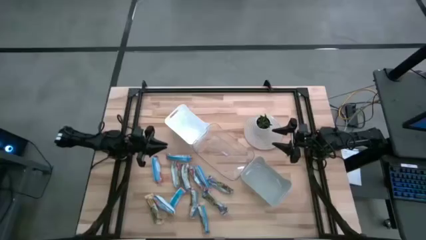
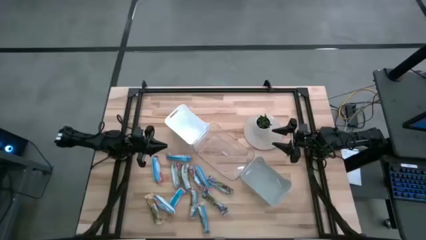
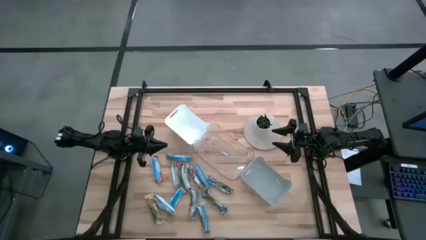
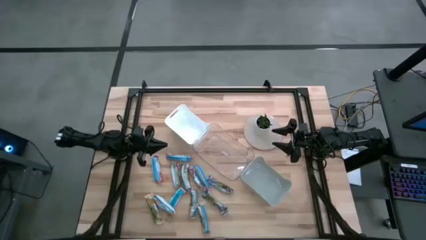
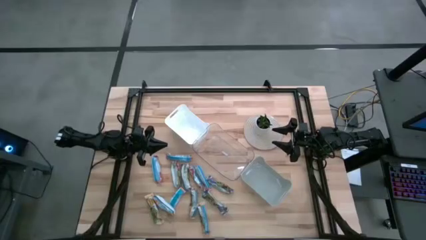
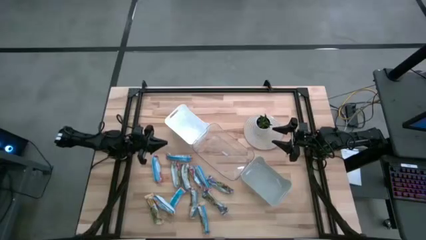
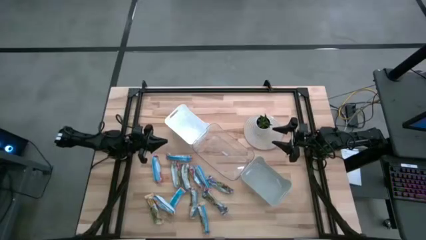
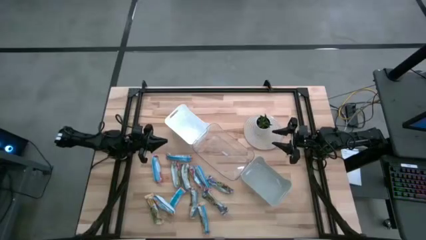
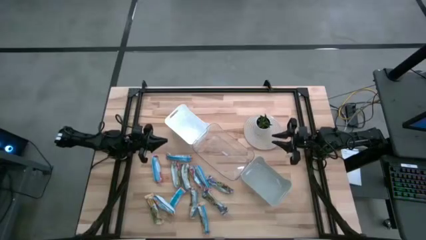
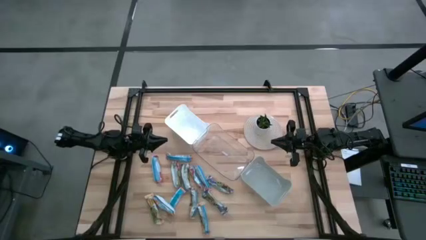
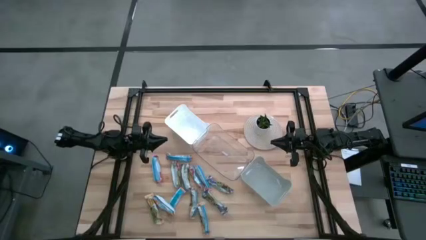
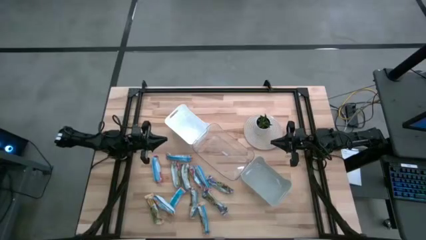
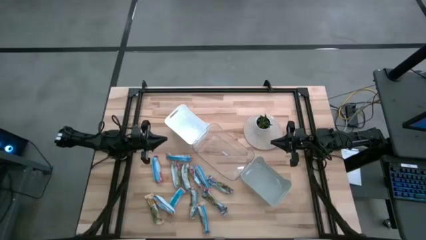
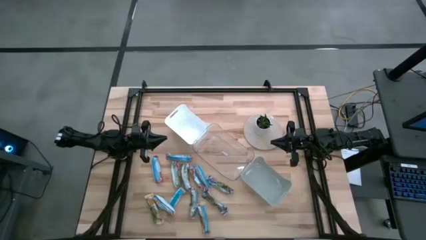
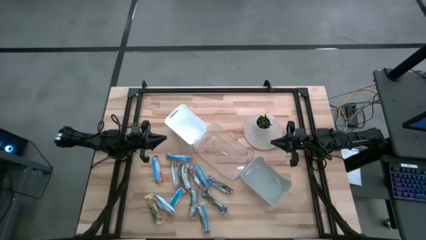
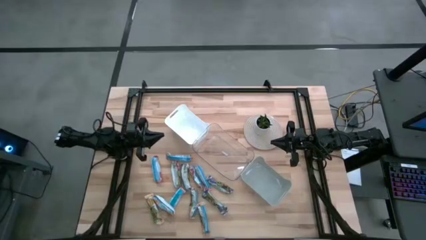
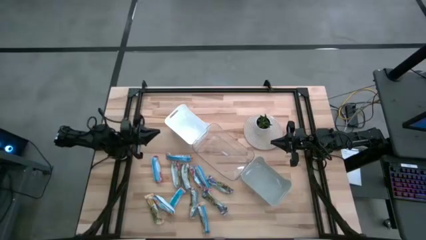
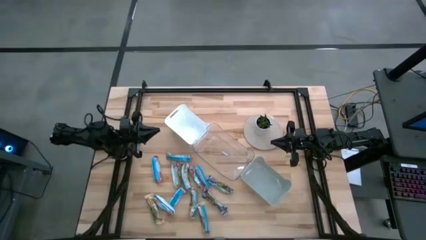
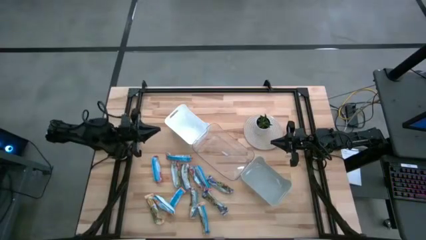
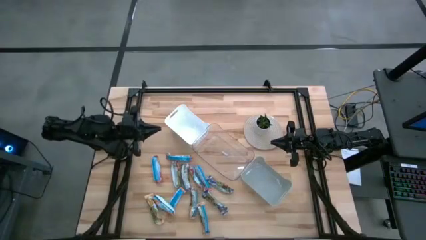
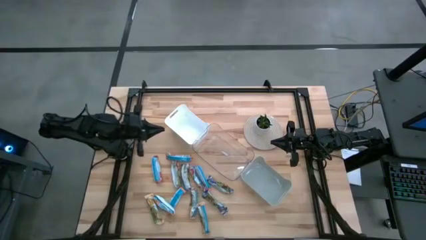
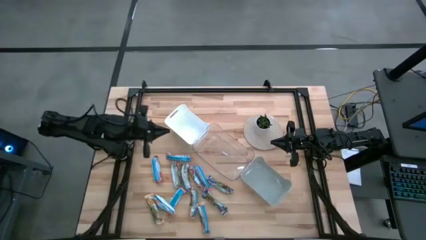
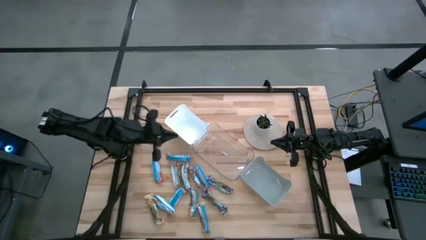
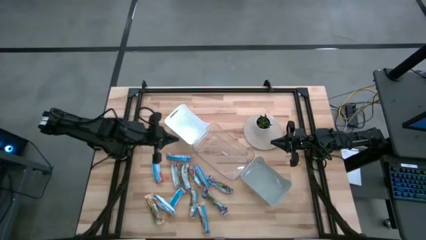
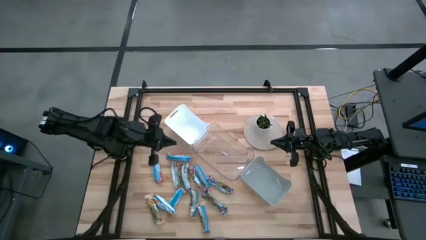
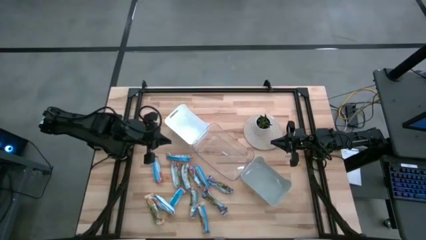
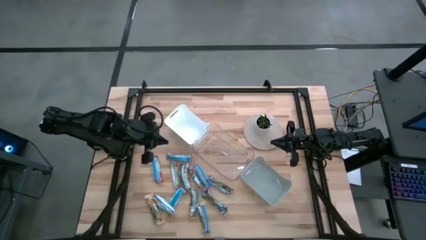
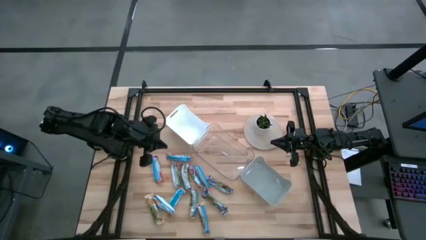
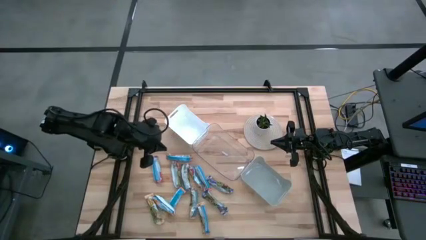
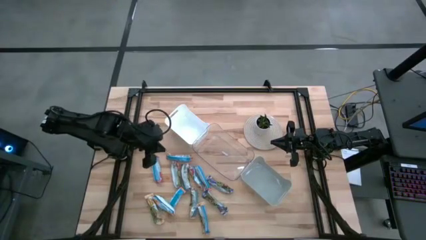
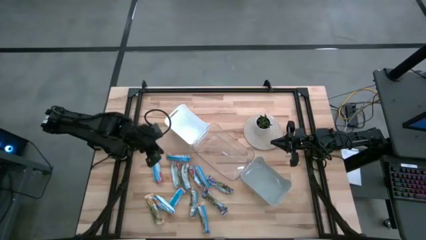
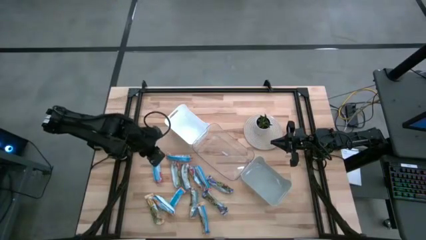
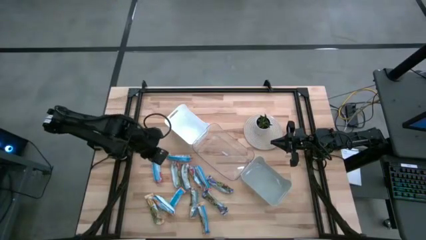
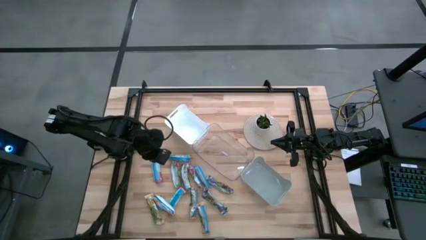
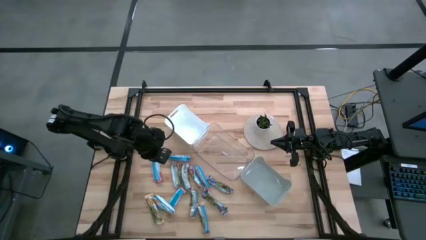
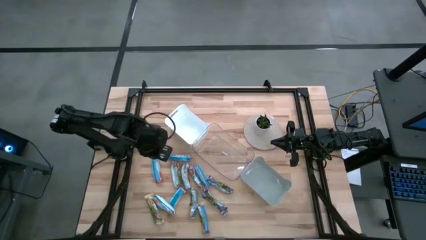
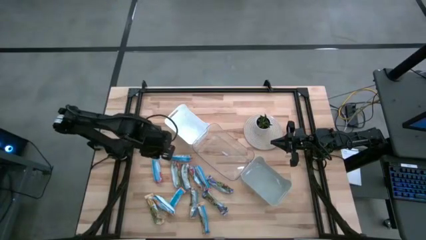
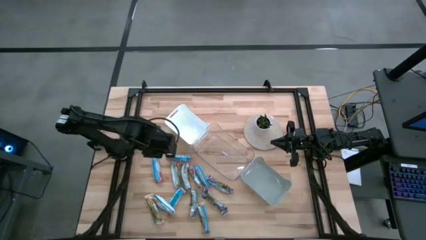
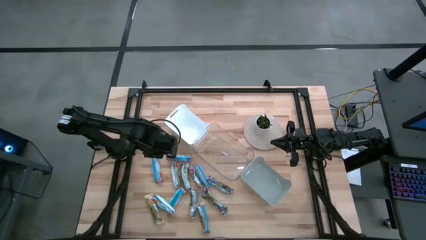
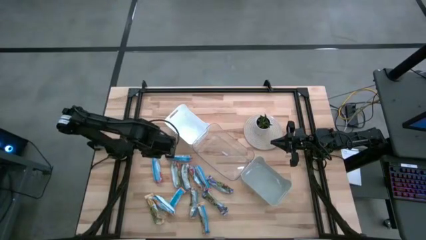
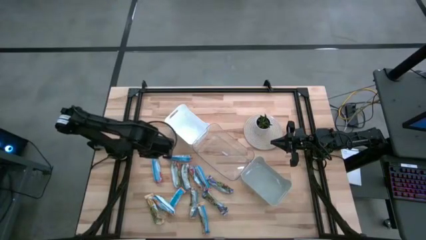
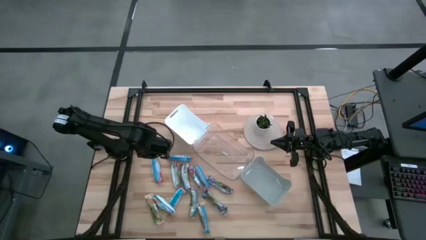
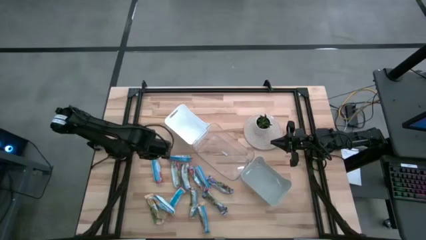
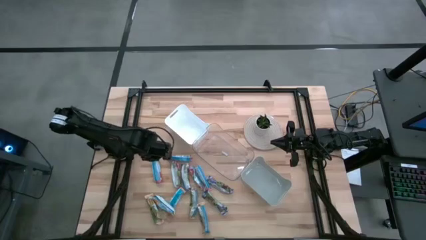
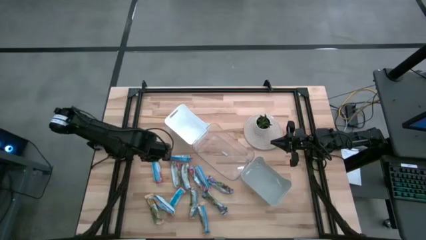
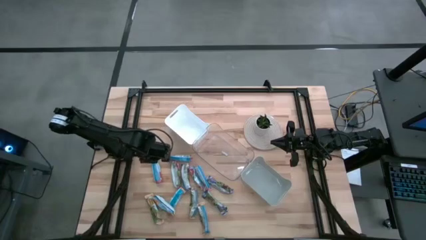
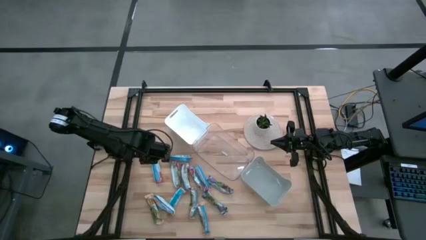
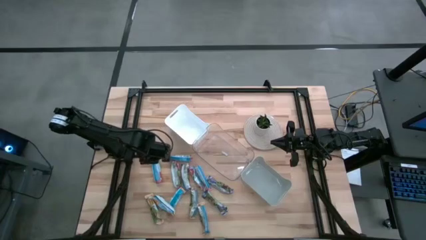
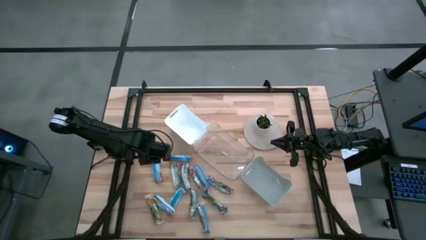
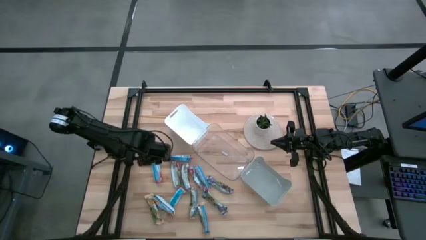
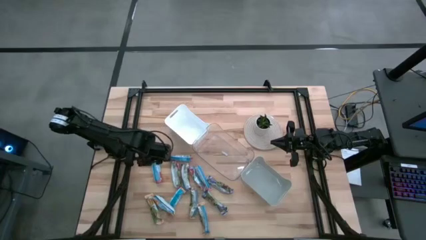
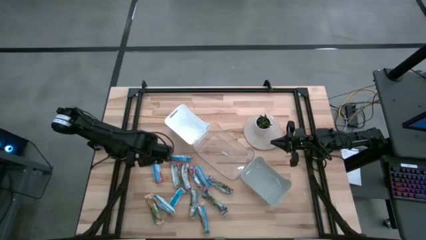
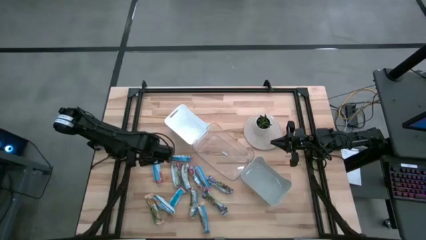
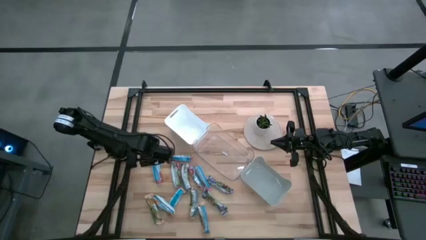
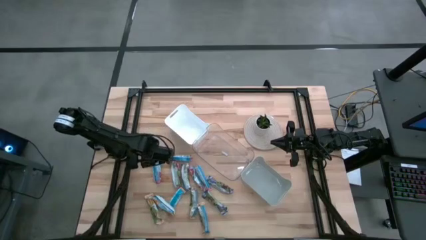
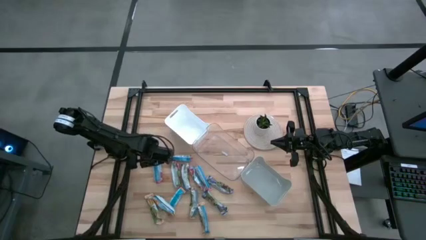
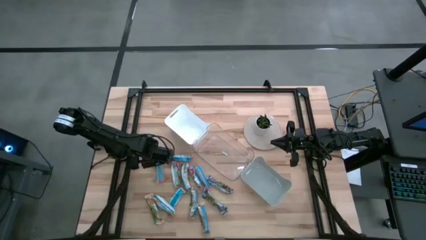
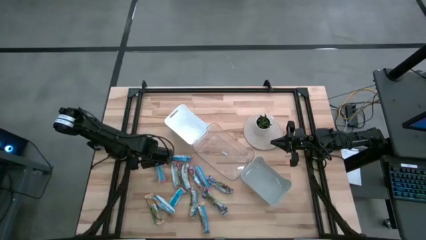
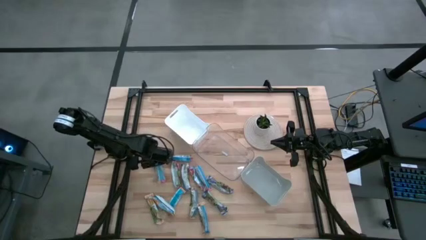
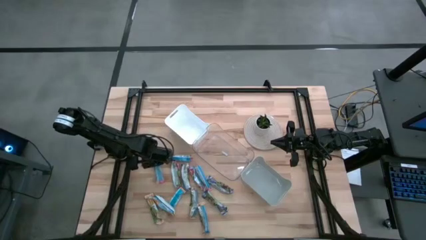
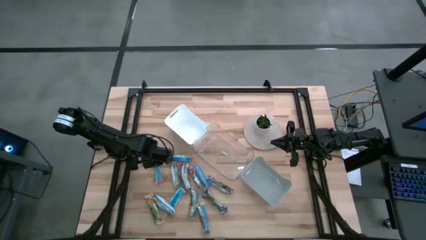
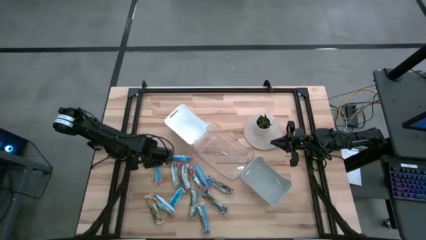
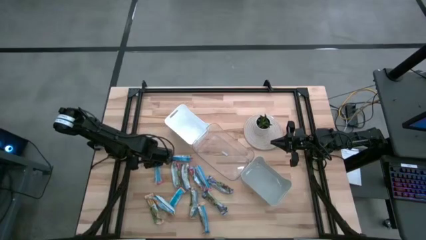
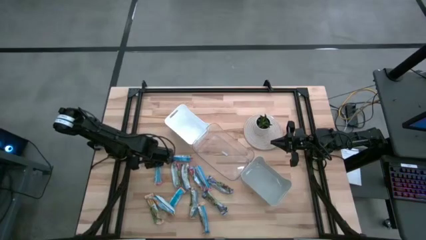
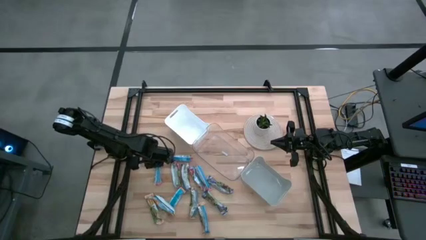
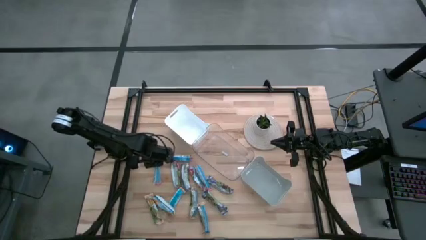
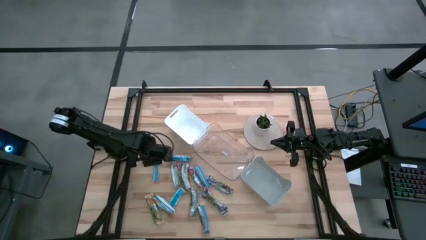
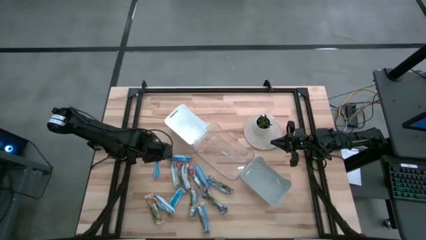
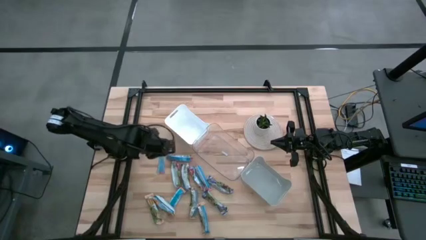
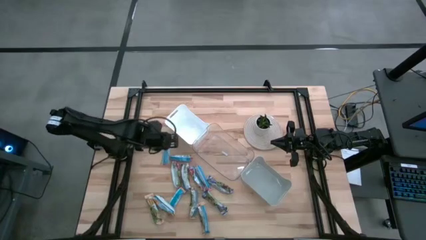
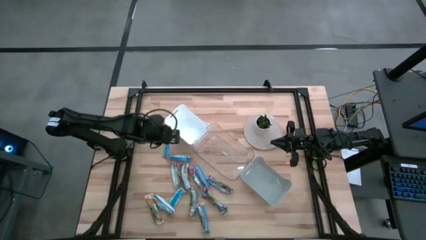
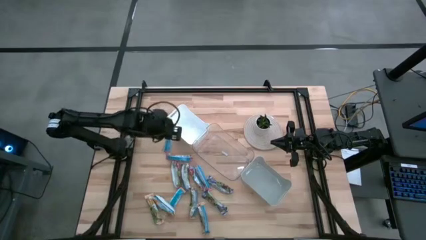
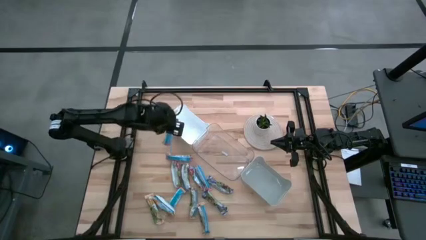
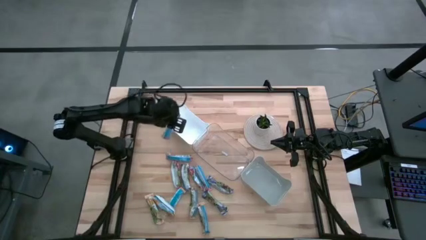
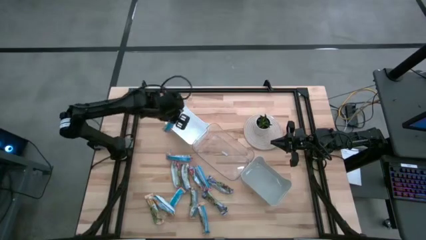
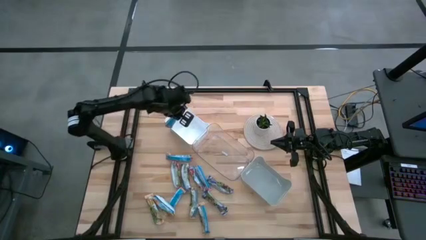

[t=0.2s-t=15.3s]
Task: Pick and place Granola Bars by type
Put the red granola bar into the white bin
